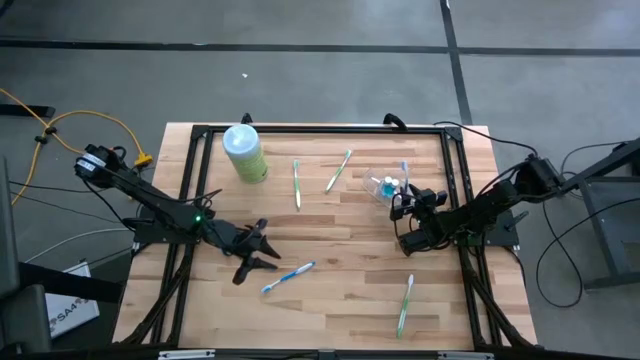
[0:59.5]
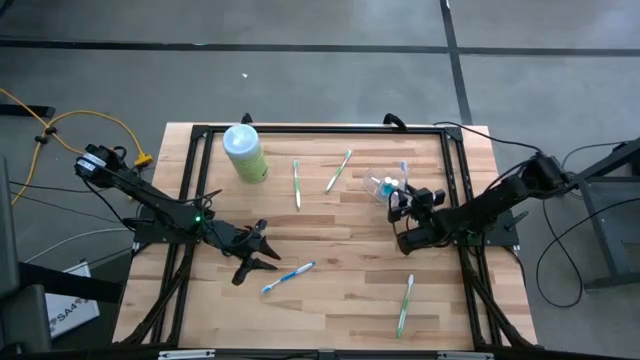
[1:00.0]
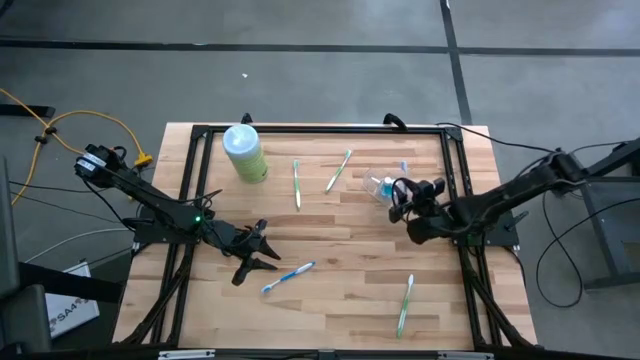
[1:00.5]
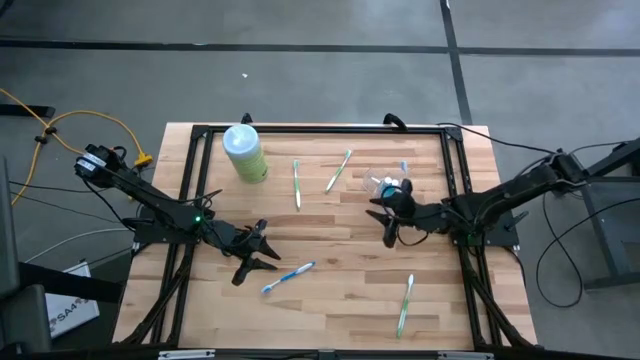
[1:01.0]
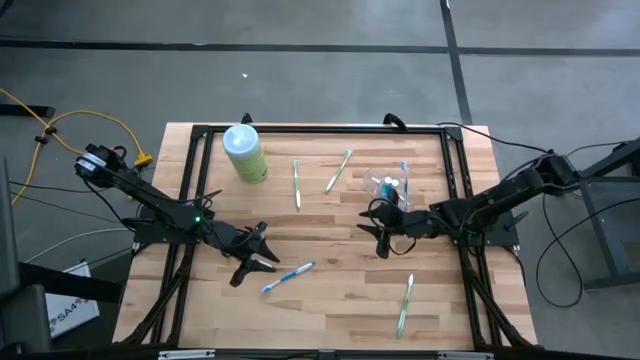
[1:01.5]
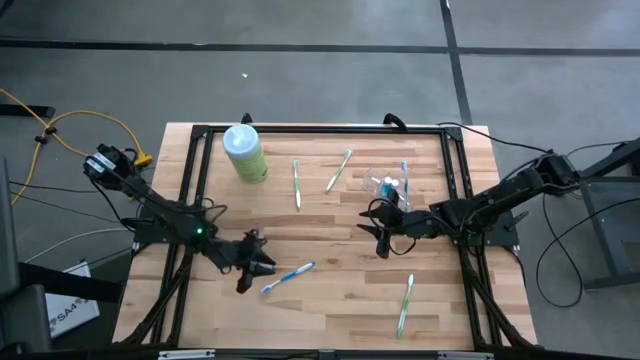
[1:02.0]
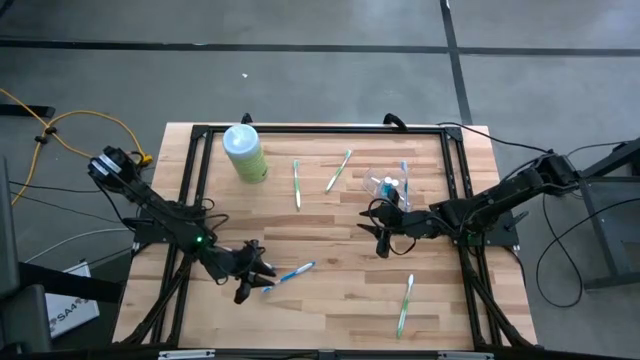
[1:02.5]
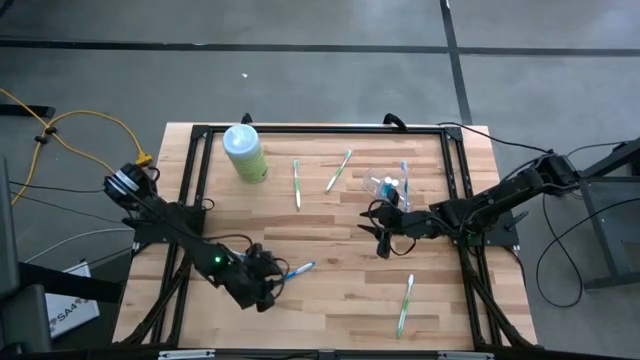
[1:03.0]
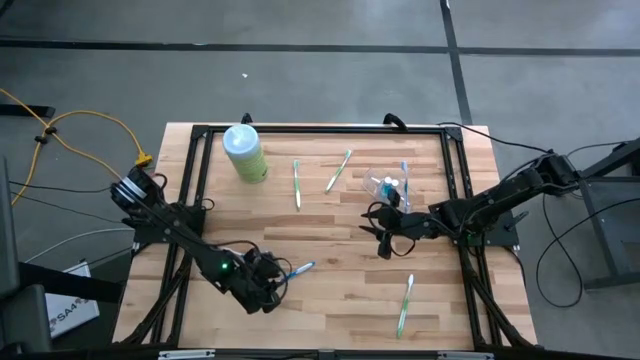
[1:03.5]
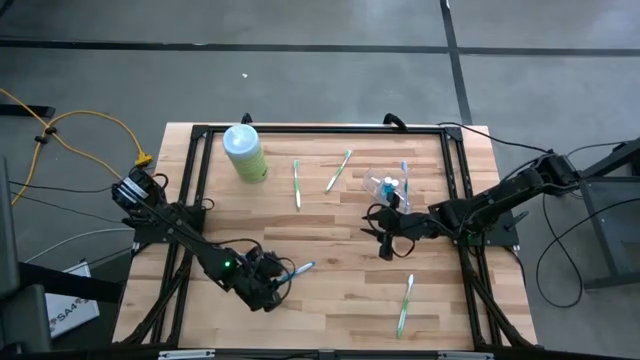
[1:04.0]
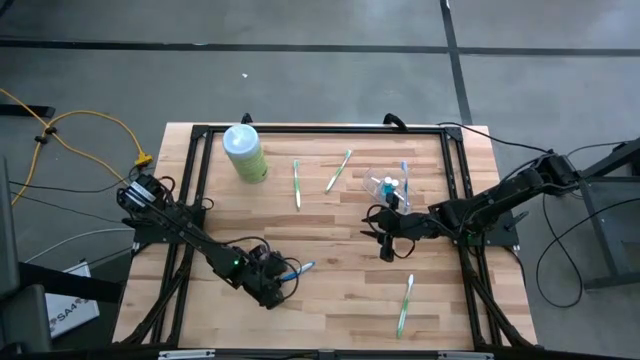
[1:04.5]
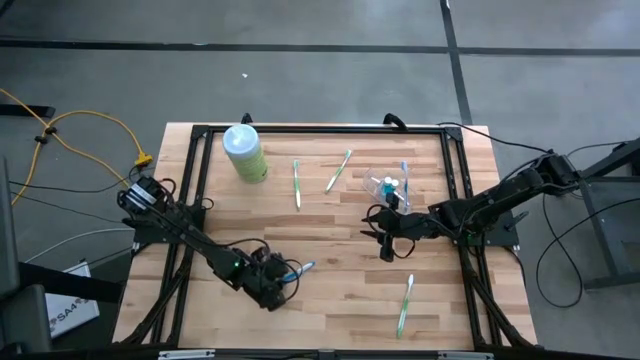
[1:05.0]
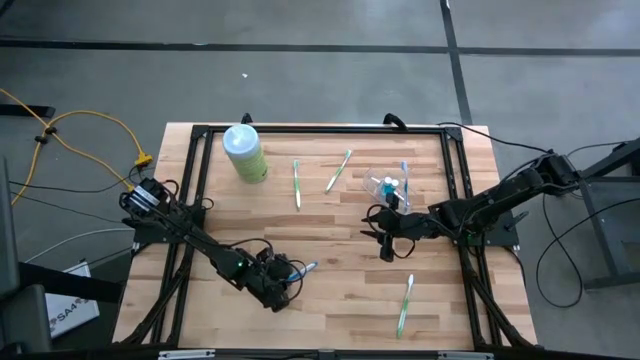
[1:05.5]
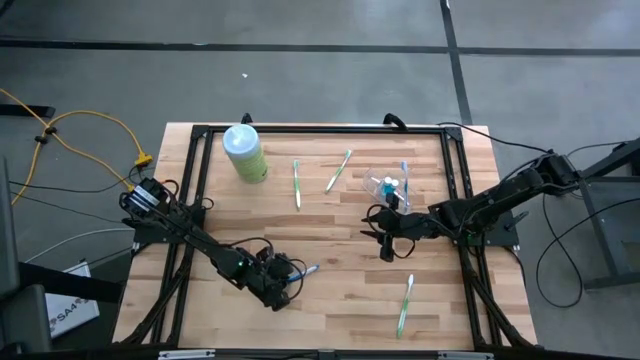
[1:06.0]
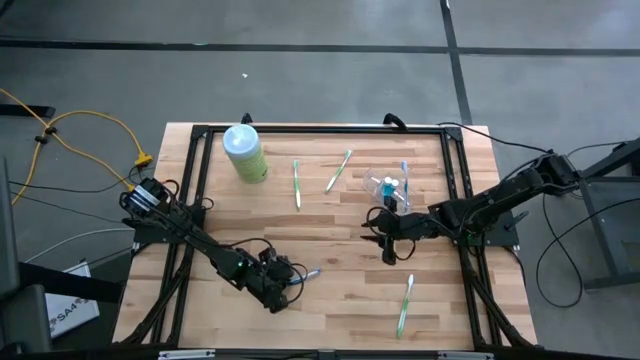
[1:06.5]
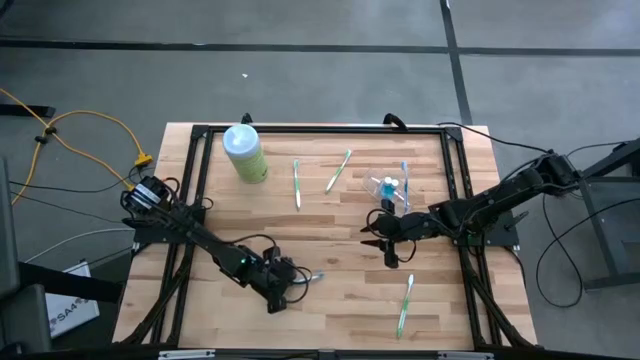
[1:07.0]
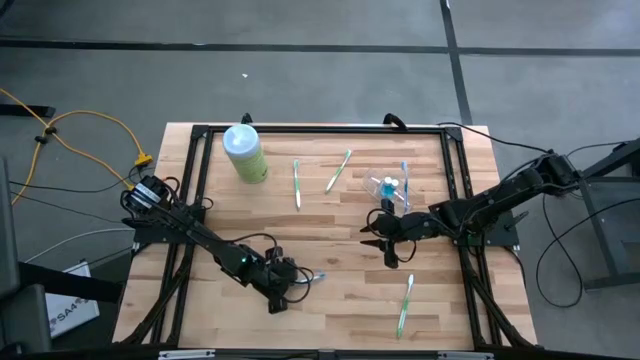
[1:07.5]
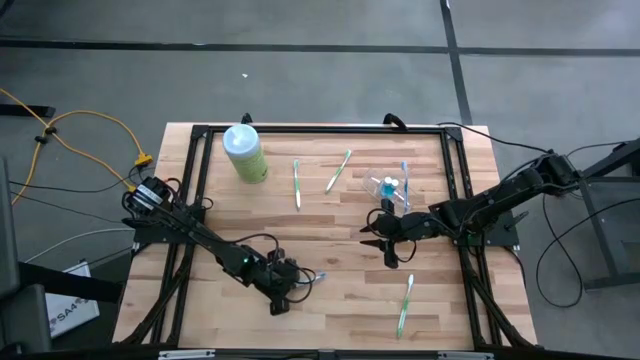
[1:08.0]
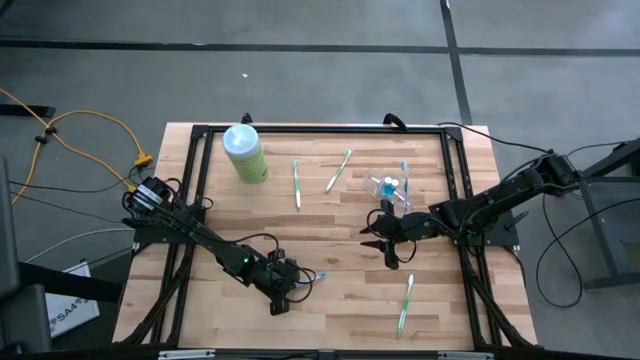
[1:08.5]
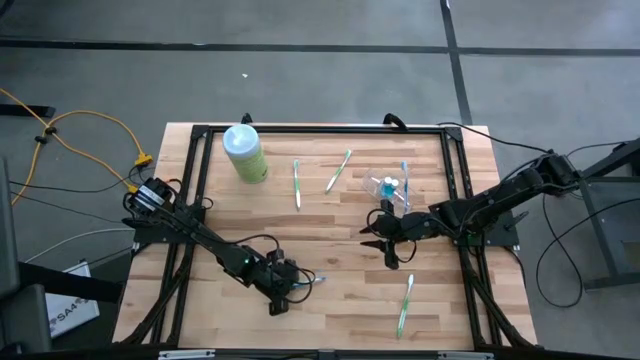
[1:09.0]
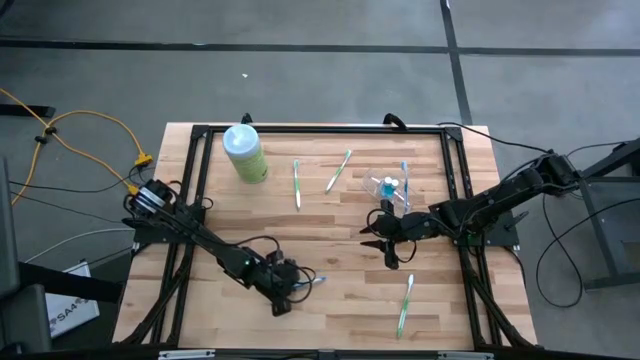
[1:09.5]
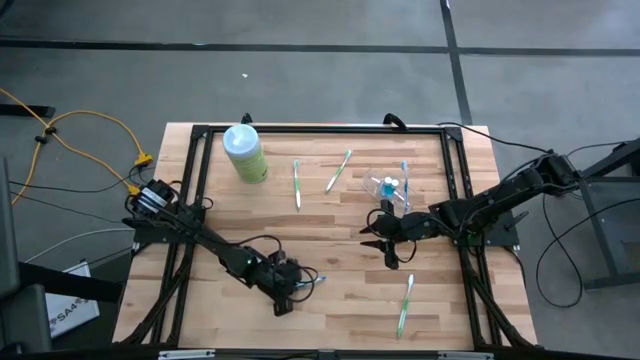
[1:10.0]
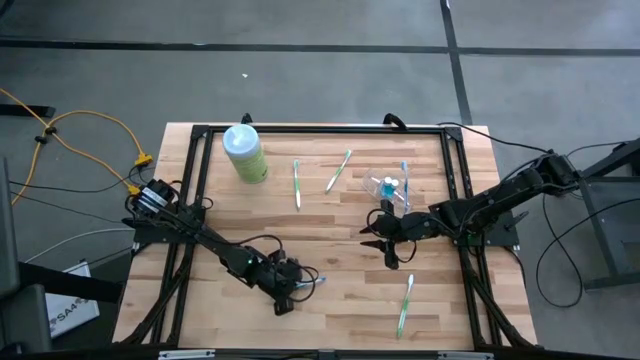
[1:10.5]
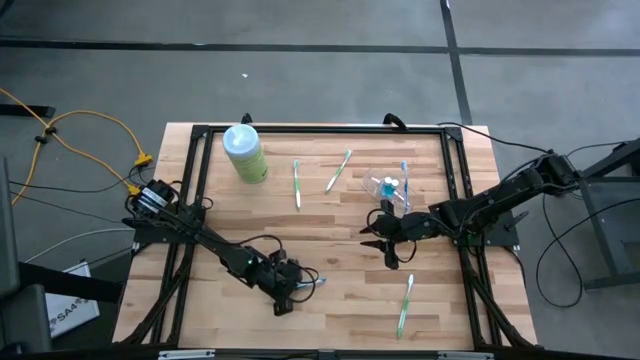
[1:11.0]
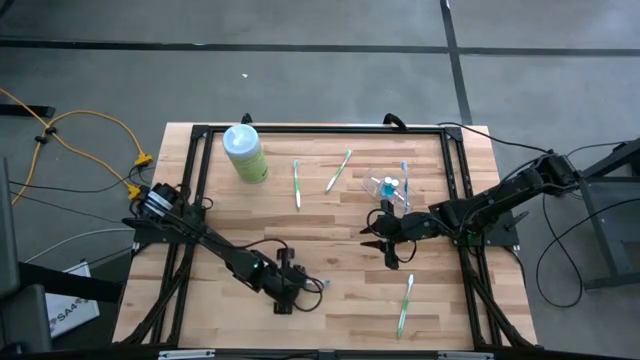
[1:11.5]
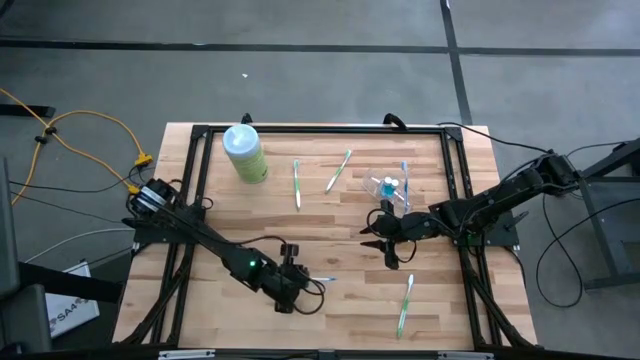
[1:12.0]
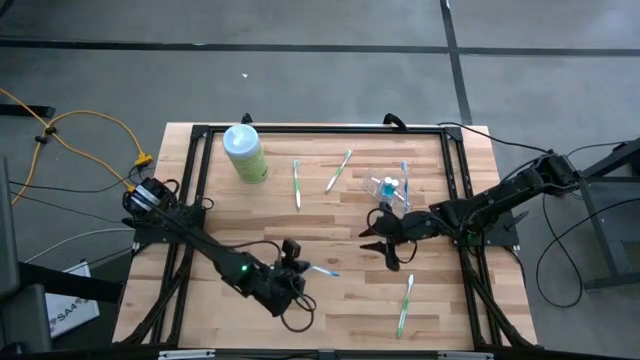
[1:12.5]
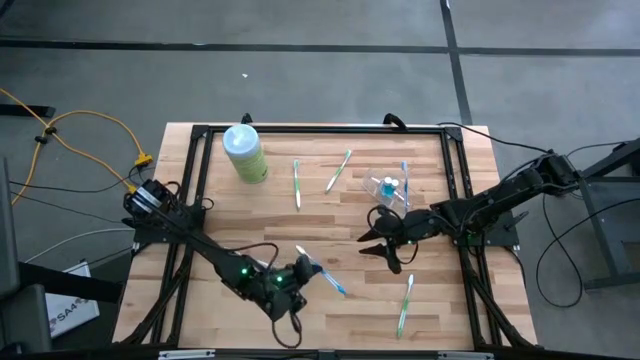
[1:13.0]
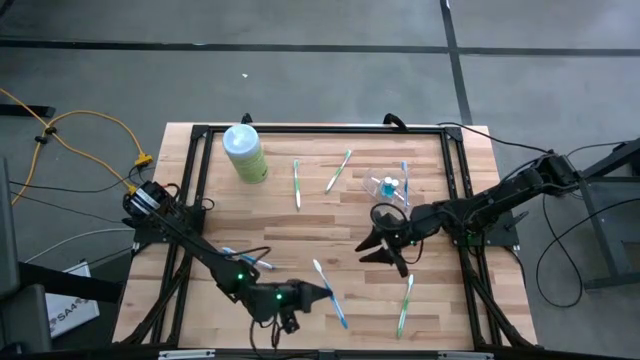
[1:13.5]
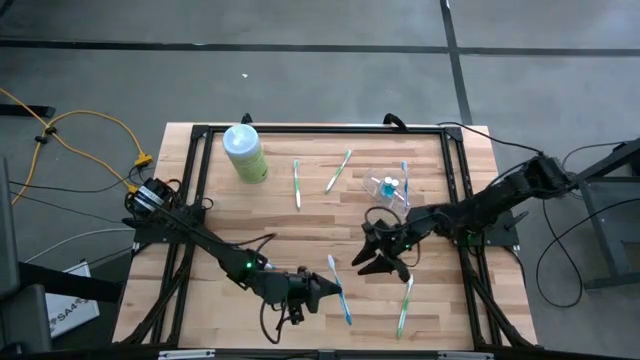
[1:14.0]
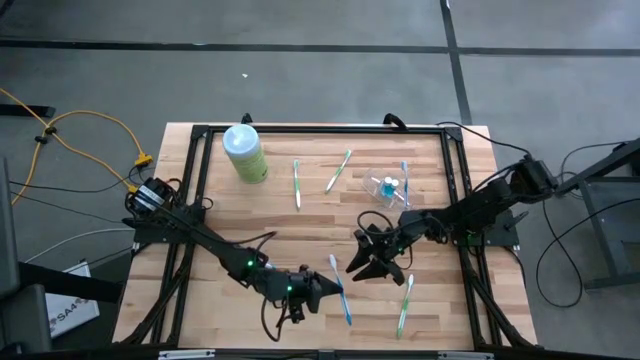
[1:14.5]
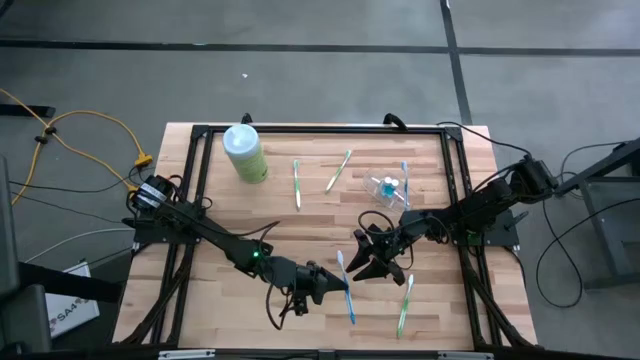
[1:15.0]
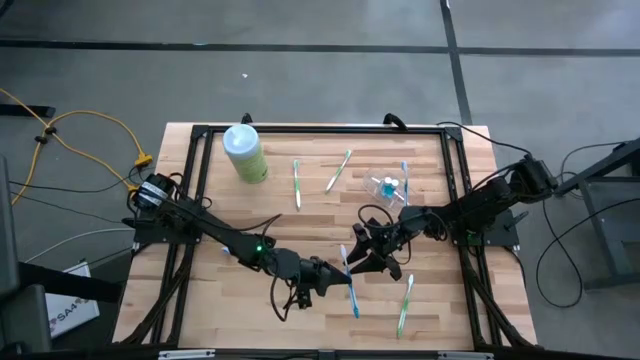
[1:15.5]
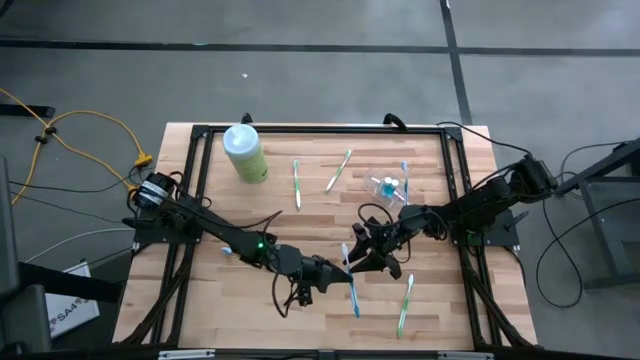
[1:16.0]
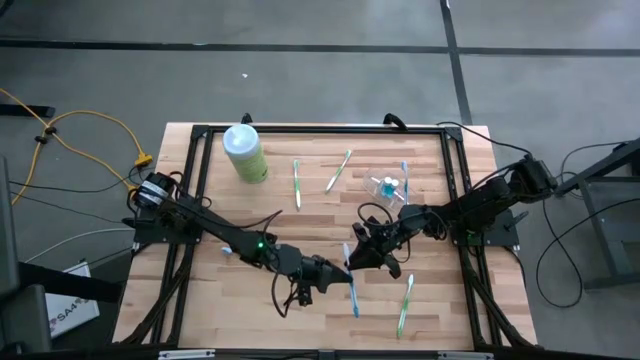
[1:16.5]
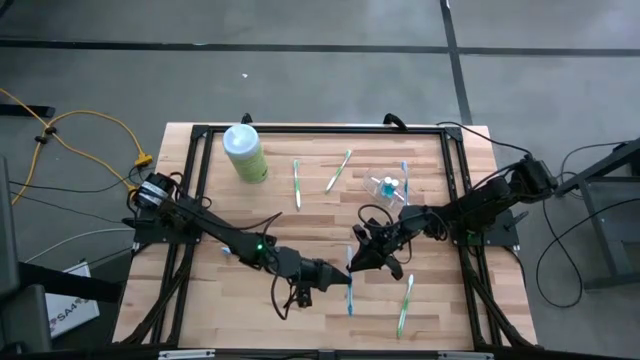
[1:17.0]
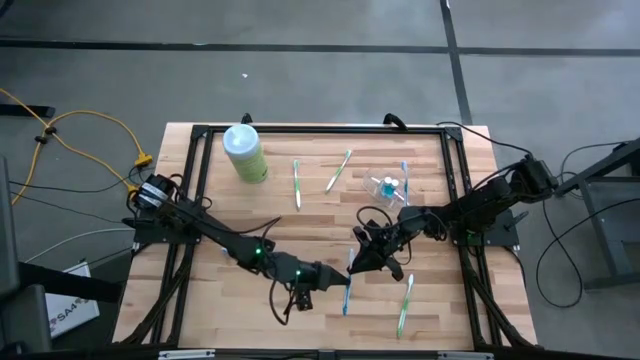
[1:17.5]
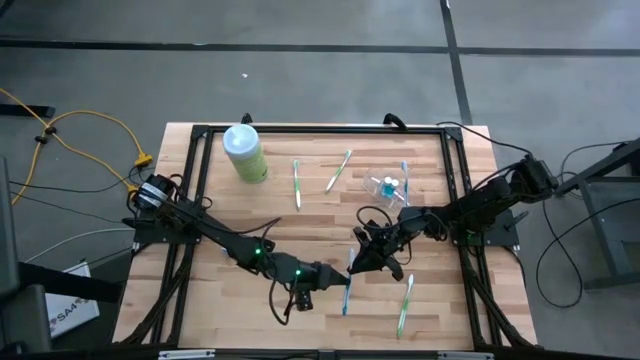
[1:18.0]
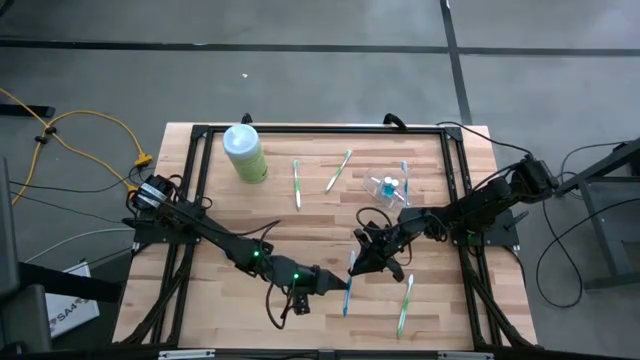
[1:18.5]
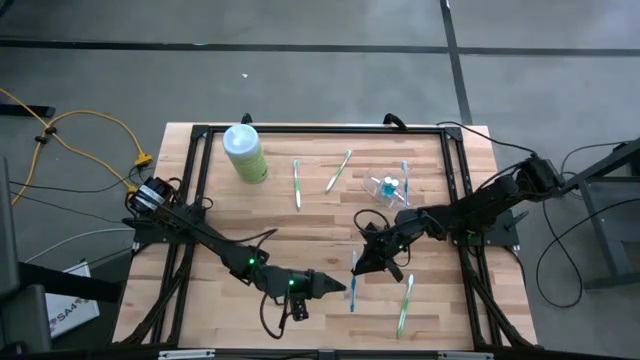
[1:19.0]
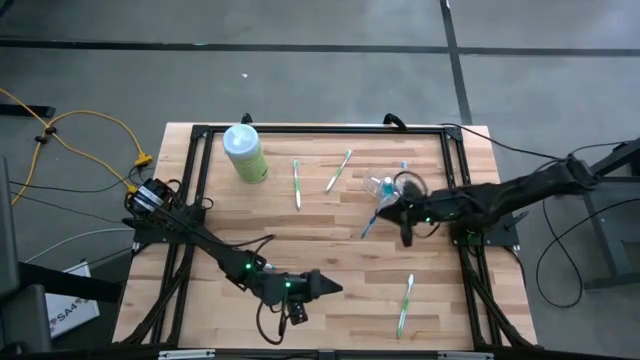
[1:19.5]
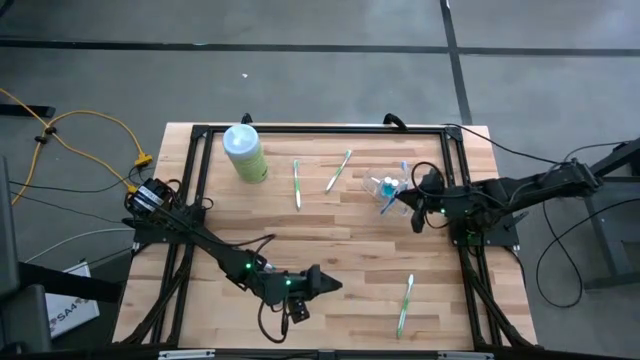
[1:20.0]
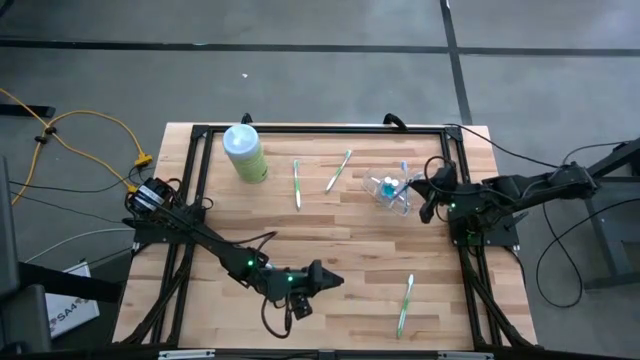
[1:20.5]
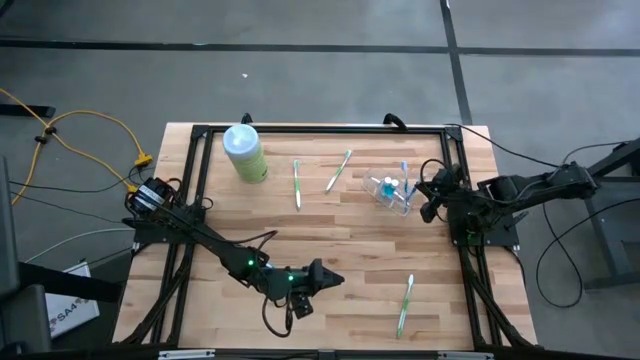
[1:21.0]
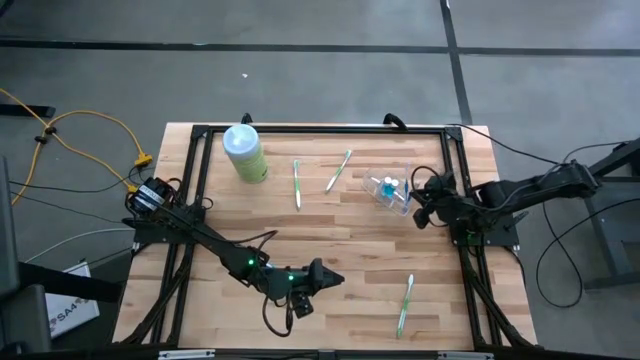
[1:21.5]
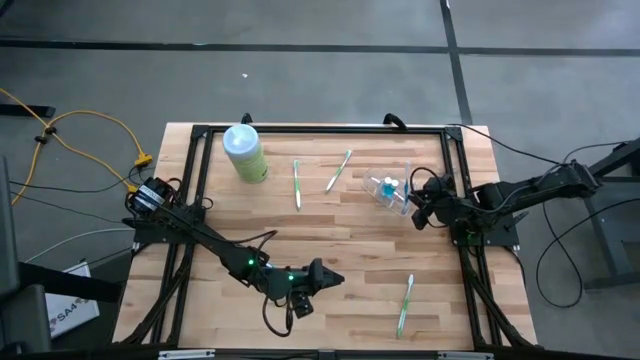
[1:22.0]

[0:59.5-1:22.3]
Task: Pick & Place toothbrushing station
Put the right blue toothbrush into the right of the transparent organizer
